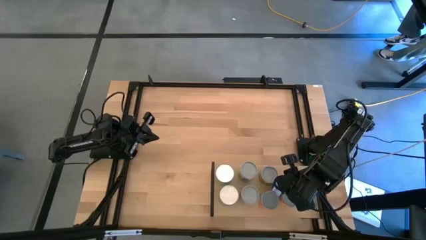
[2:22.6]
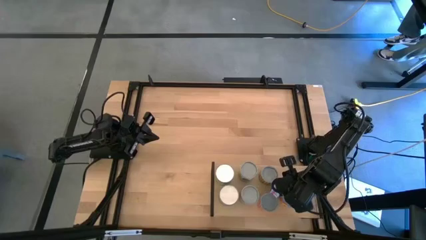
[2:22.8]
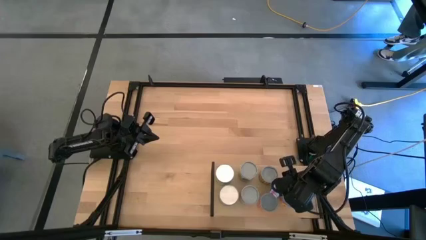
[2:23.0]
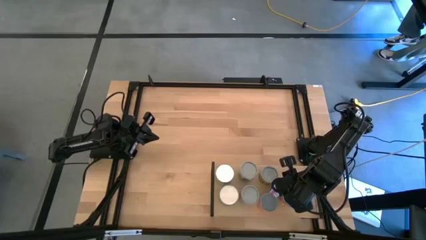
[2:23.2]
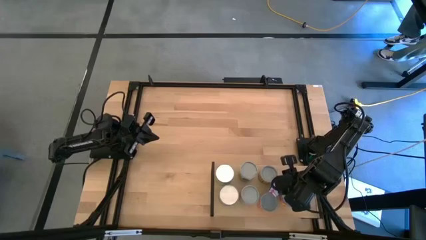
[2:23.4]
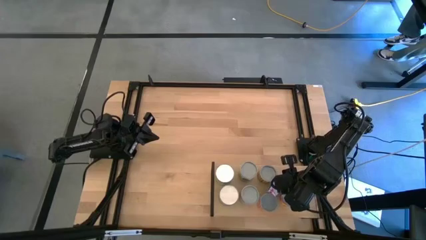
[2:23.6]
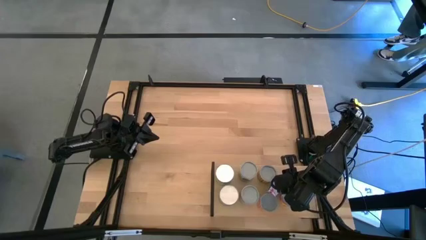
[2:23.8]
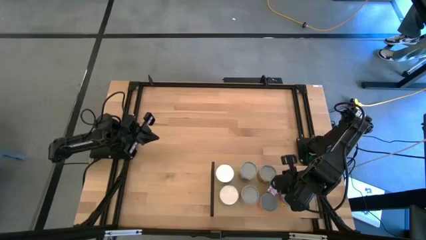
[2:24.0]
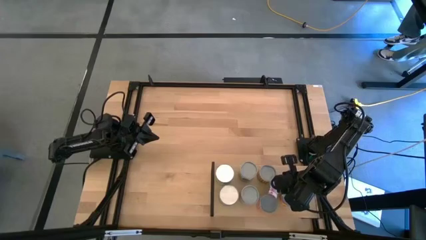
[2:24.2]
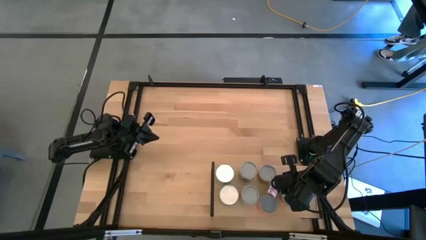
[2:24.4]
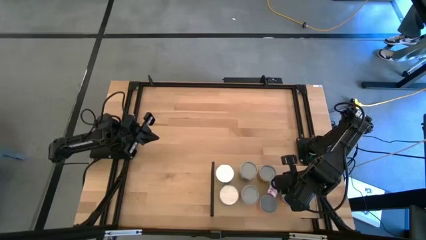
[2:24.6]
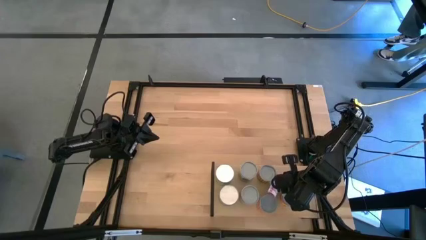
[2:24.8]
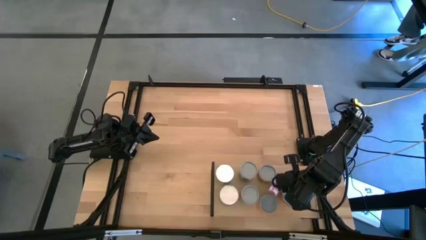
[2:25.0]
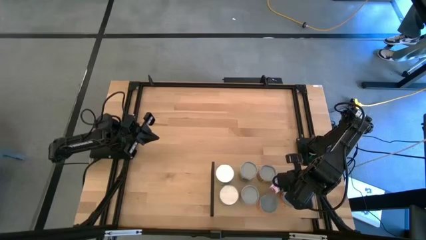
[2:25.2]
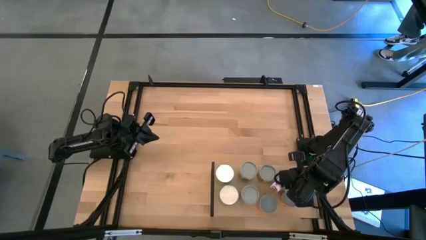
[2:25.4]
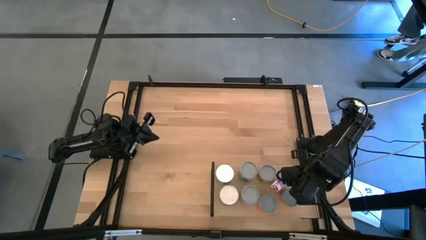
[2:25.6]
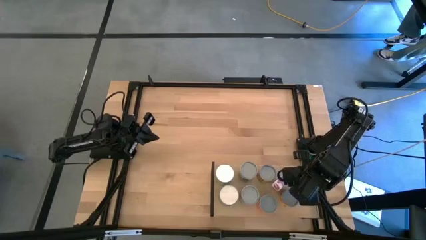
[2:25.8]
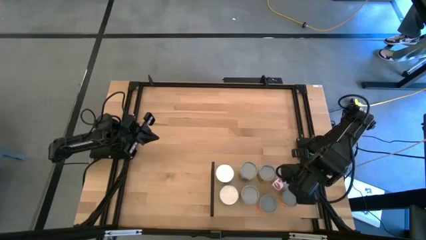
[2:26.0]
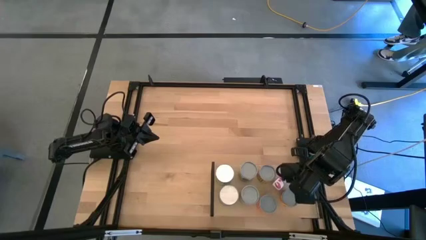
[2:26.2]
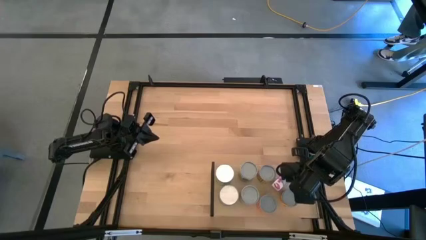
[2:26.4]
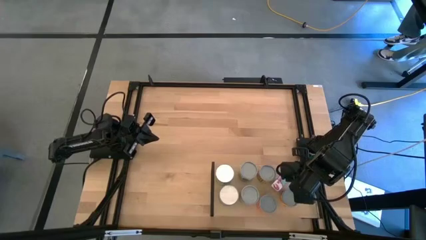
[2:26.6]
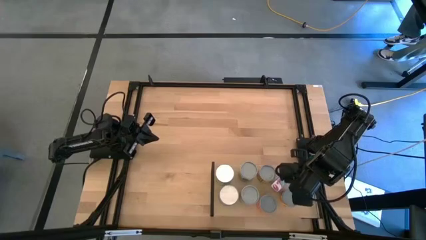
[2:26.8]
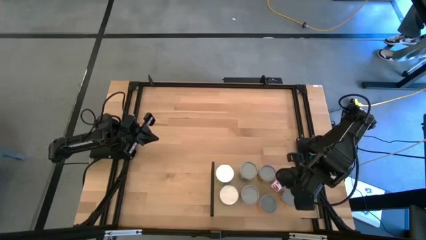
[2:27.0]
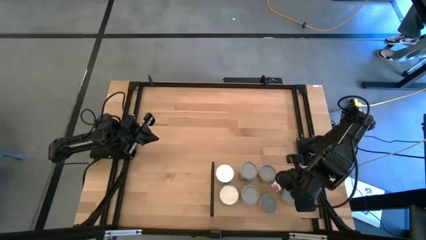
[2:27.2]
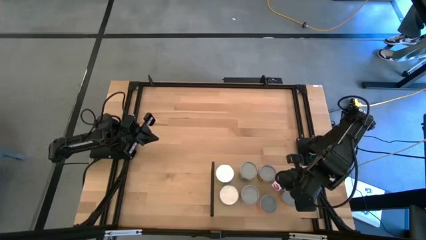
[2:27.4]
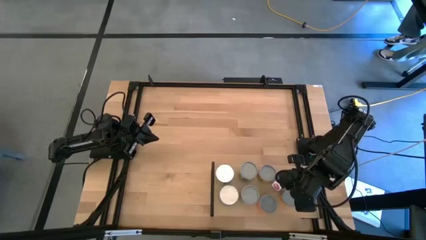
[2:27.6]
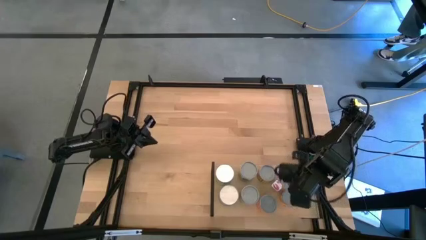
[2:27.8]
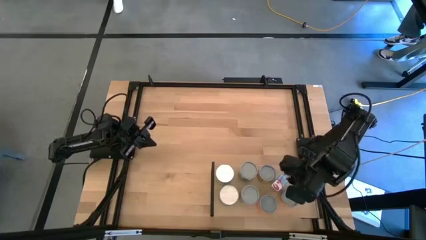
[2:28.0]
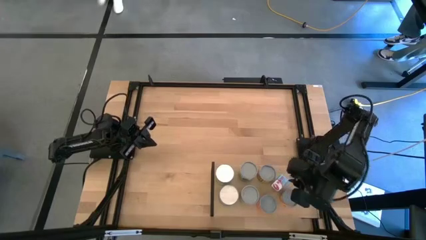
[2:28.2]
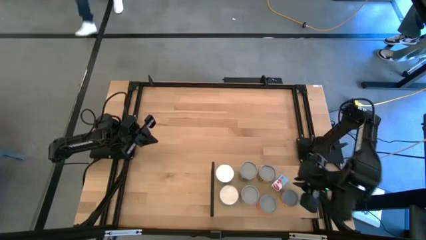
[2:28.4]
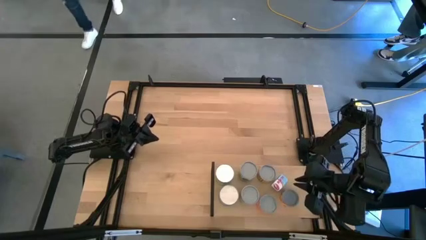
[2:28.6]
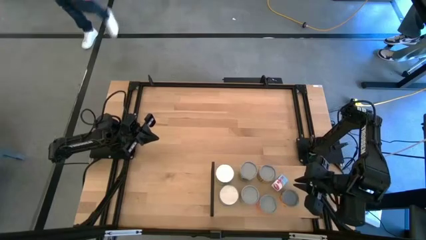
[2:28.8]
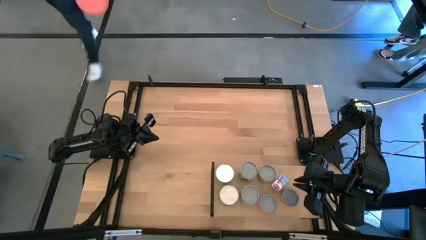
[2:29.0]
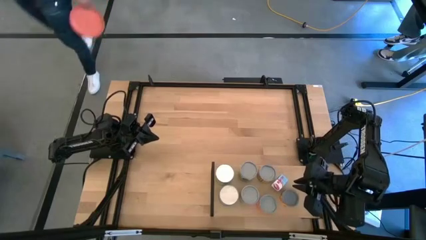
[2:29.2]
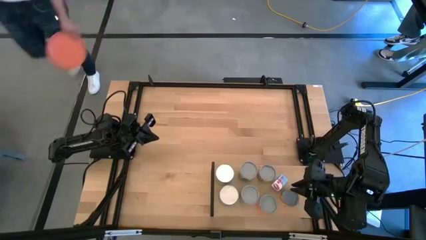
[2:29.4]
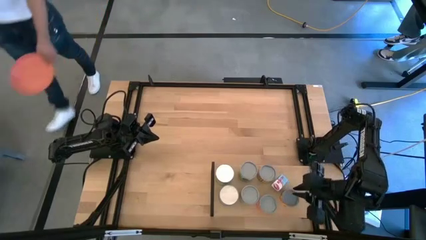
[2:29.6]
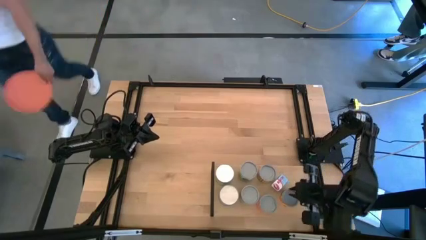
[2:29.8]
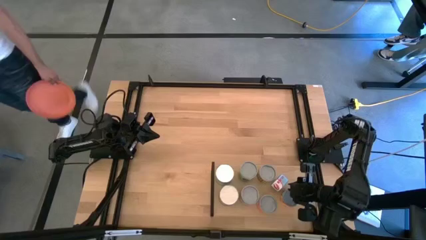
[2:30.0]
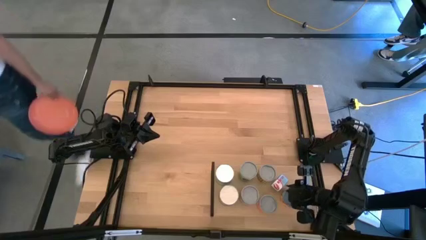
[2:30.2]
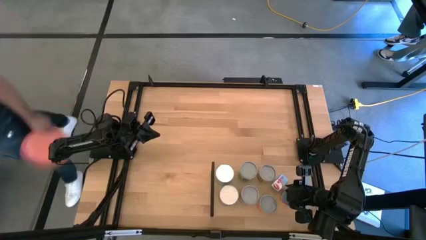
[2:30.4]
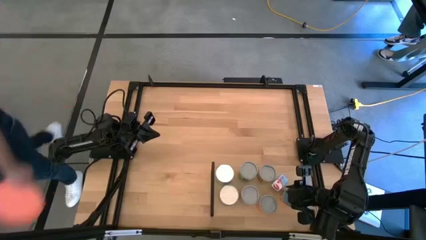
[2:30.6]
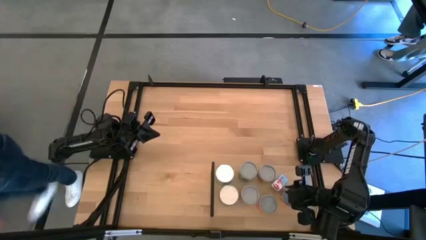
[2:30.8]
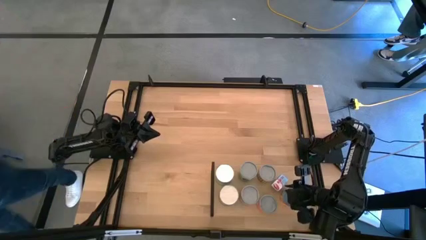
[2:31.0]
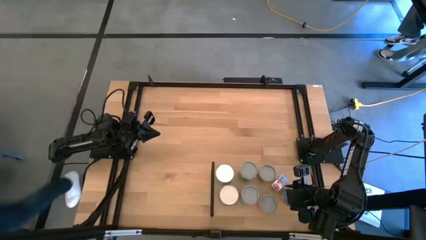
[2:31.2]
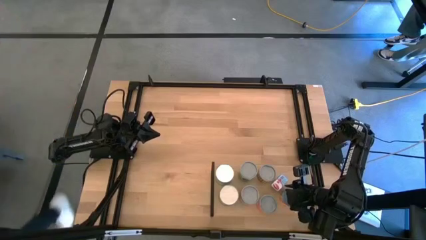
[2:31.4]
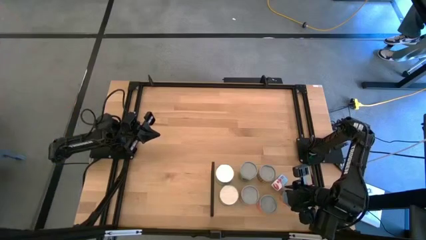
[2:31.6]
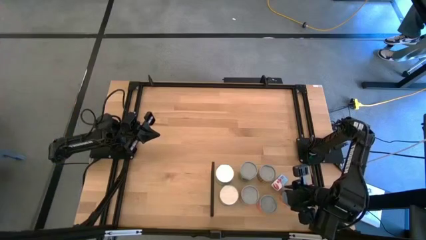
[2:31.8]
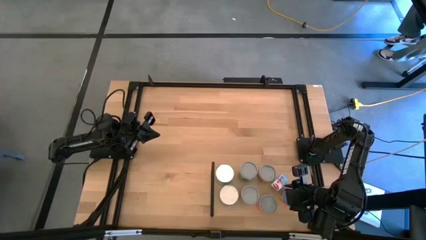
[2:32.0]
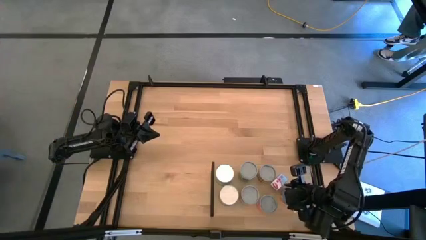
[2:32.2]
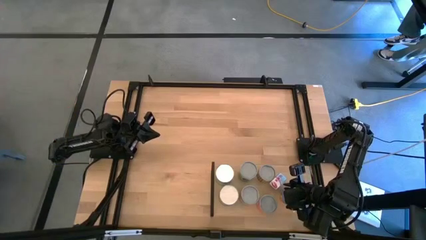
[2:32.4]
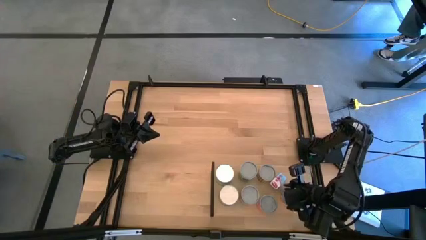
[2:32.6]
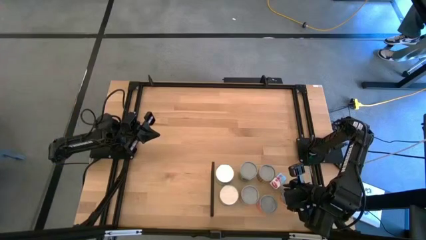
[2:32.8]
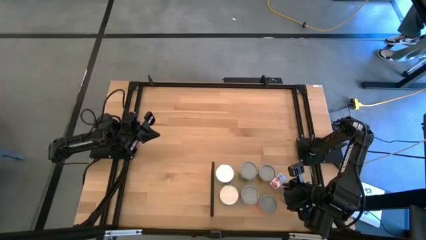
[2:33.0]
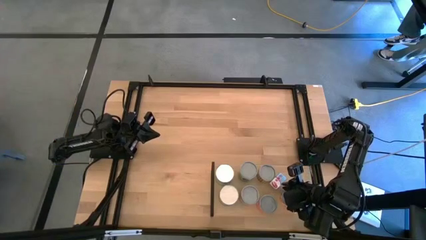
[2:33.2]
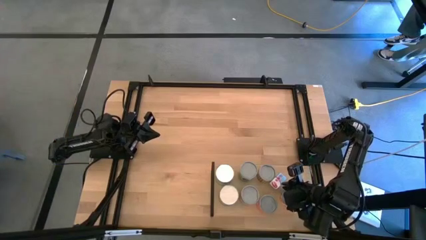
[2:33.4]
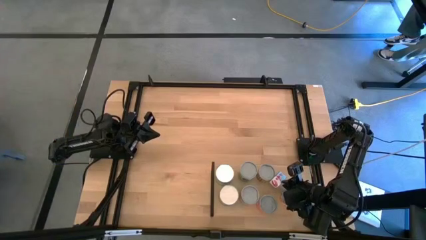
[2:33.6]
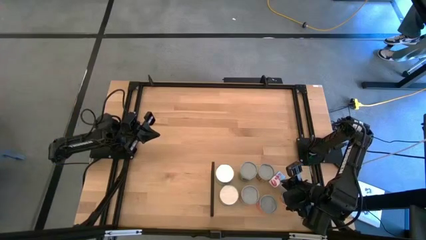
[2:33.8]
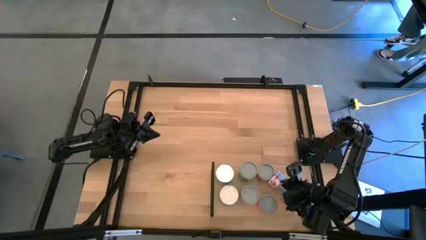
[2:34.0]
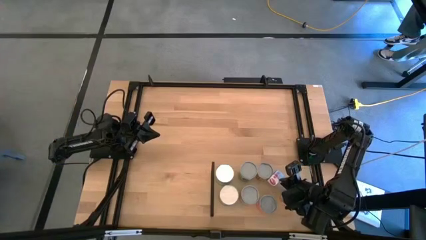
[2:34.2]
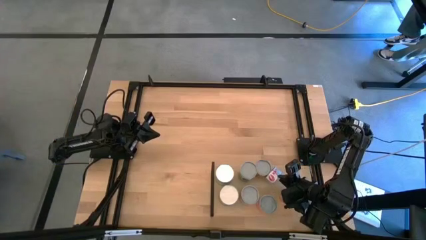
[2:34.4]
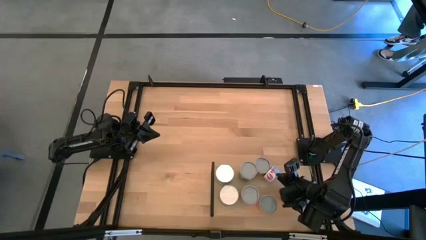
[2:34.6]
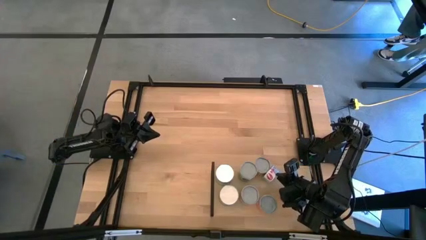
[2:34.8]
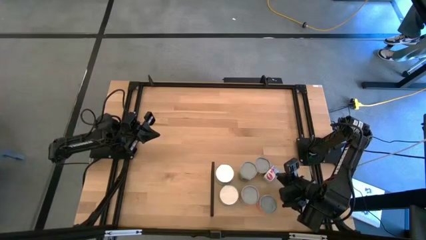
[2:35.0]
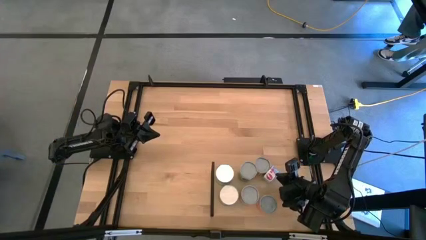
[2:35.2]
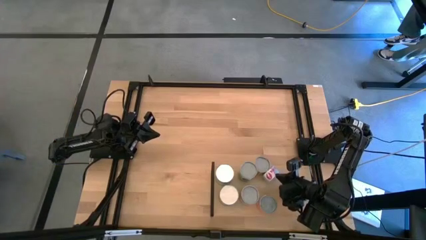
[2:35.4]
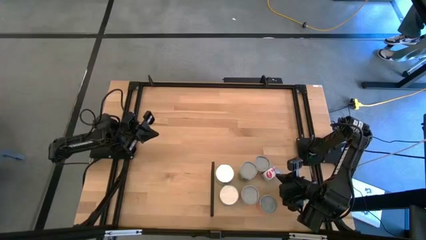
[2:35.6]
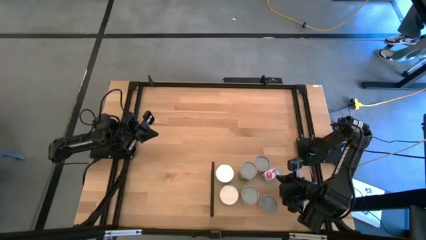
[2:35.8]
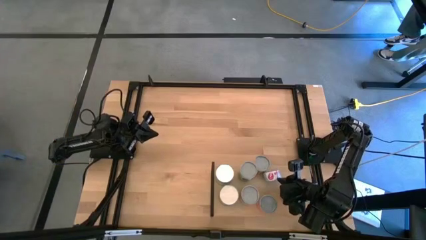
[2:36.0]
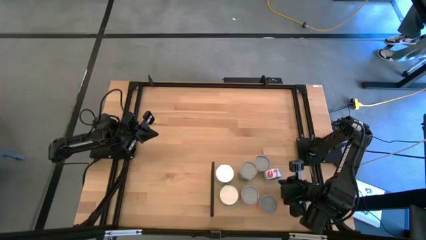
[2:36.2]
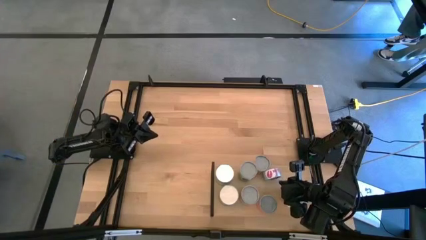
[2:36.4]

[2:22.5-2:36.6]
Task: Pick and place cans onto a shelf
Adjust the tuna can on the shelf

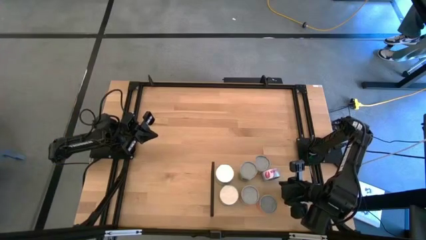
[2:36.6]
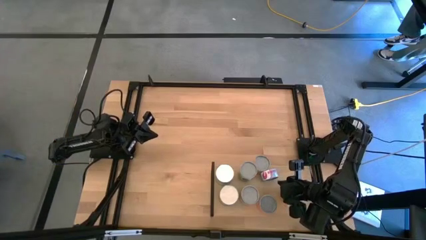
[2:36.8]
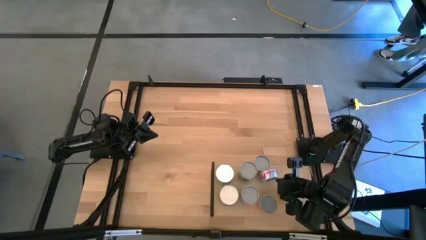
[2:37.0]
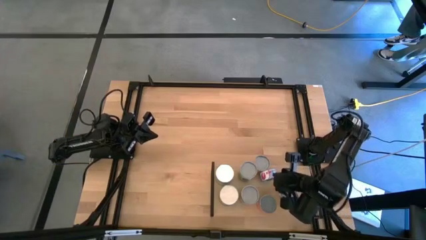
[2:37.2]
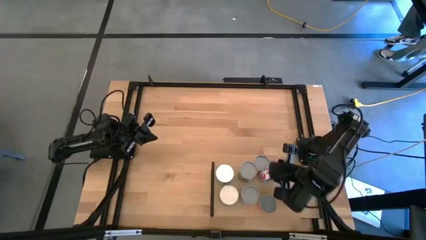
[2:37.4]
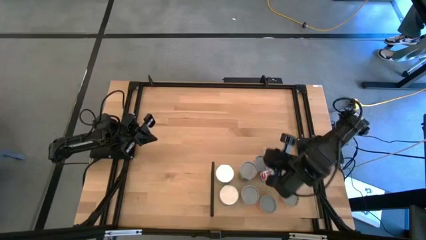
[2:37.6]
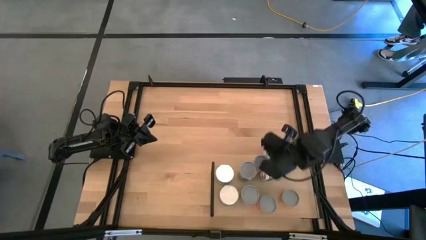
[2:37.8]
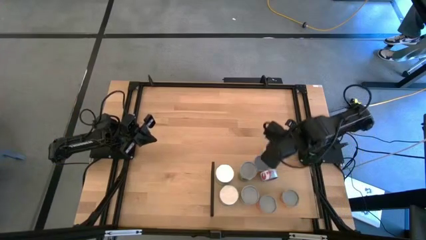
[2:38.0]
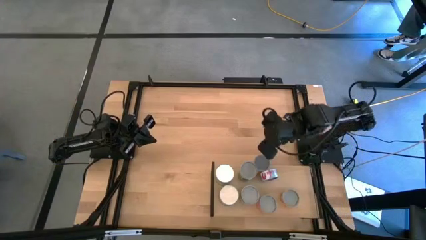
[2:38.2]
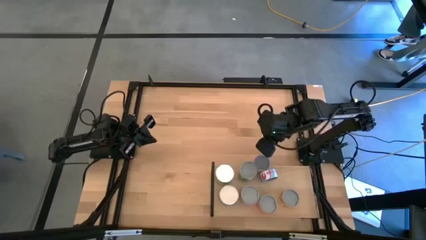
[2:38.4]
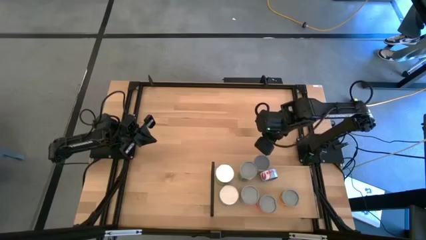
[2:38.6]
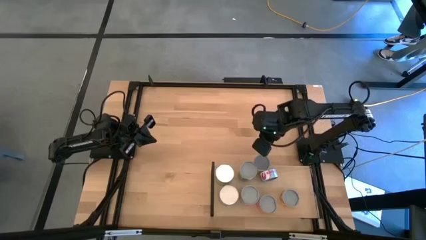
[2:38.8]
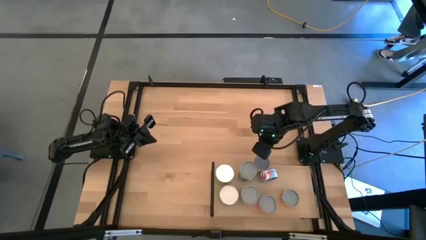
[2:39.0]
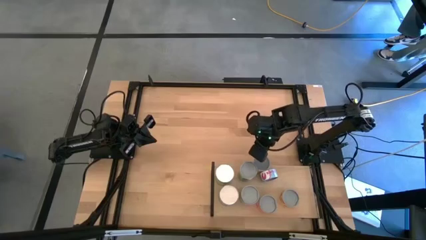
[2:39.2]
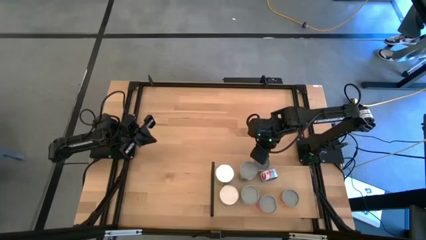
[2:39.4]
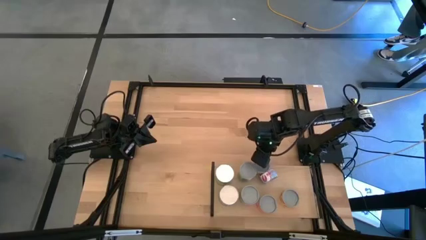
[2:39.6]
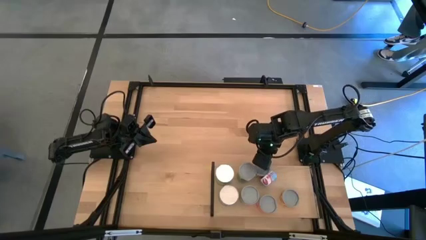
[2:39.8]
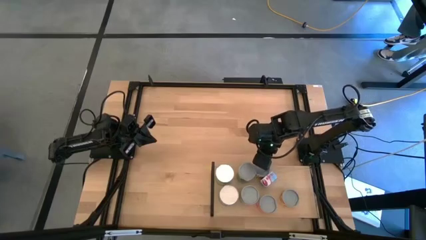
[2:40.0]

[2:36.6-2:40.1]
Adjust the canned spicy black beans on the shelf
